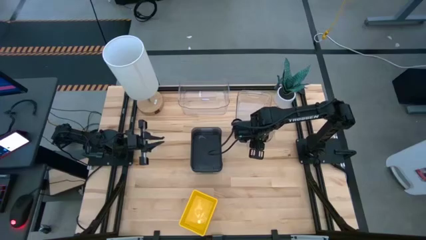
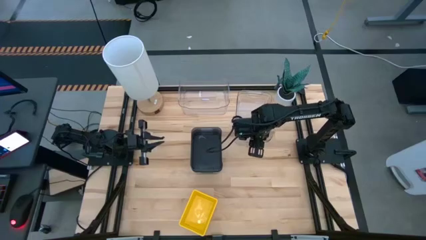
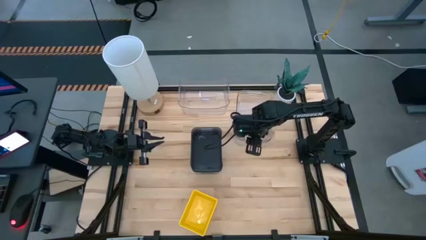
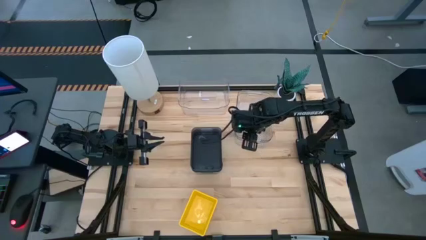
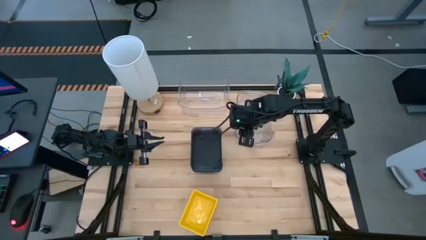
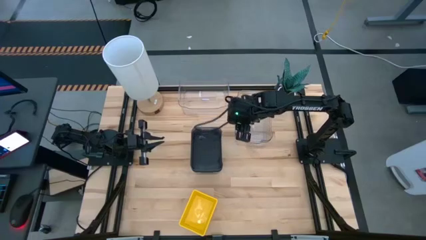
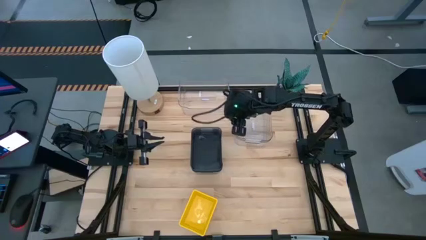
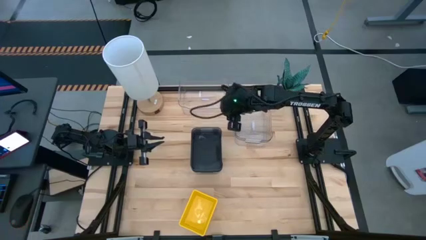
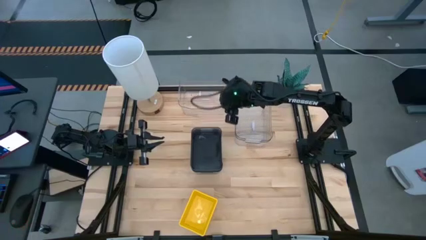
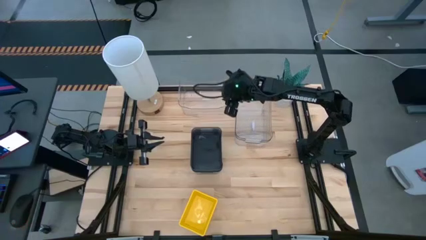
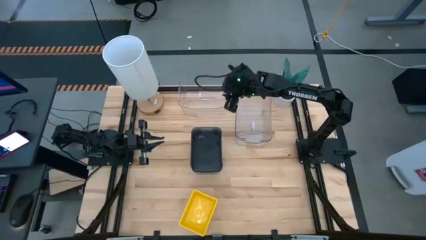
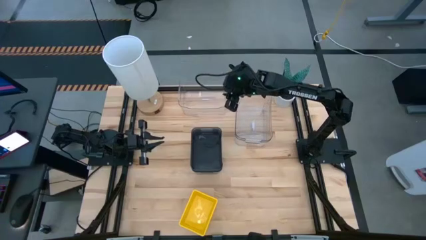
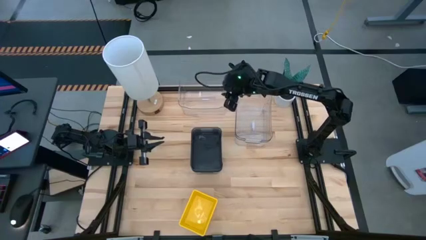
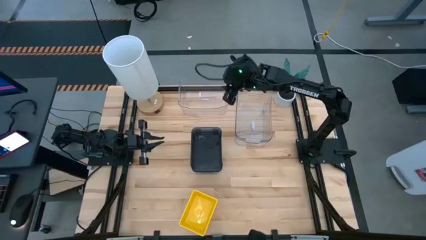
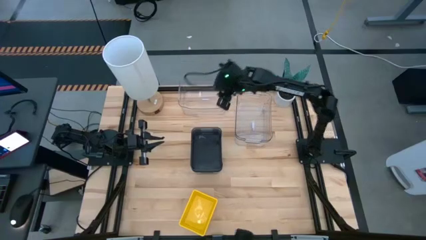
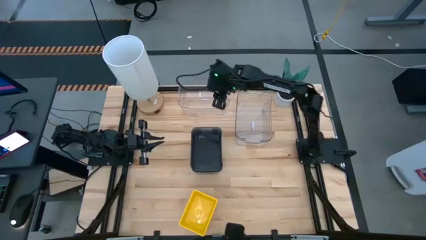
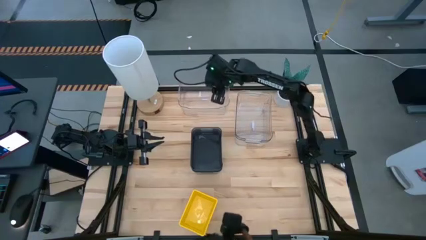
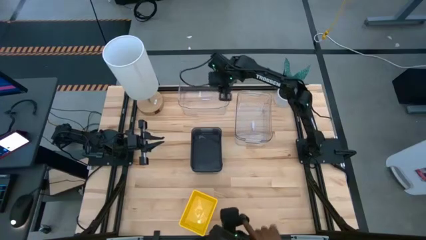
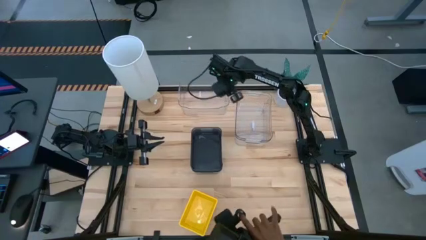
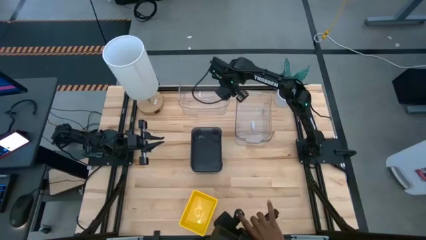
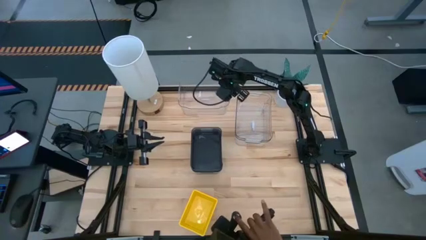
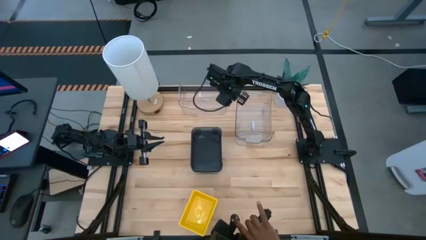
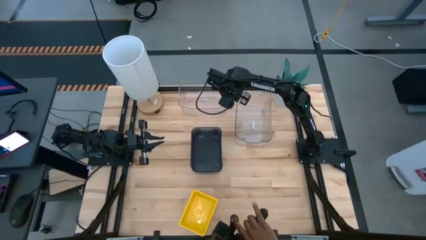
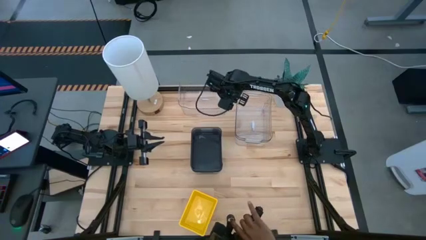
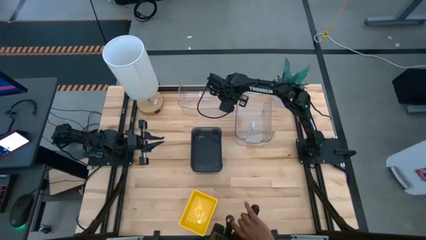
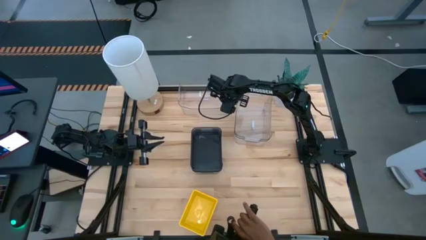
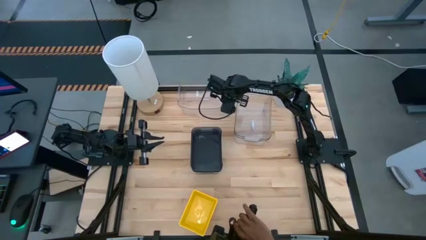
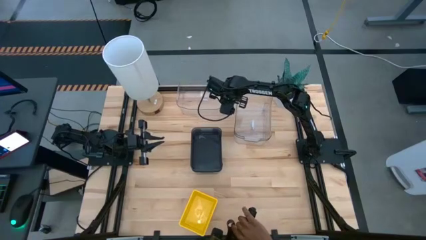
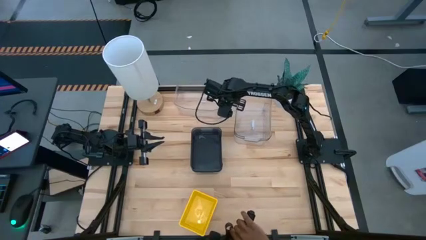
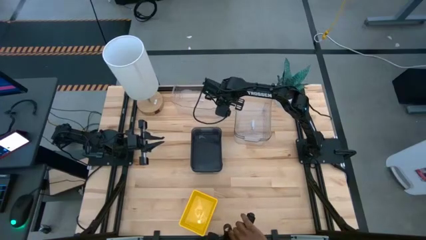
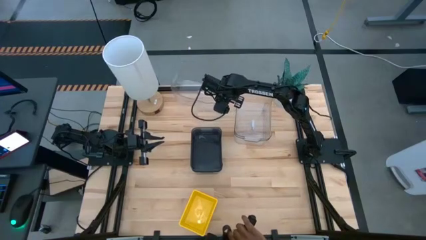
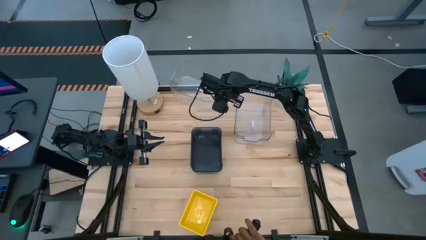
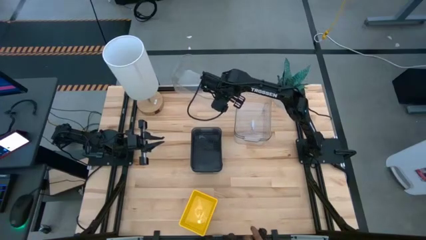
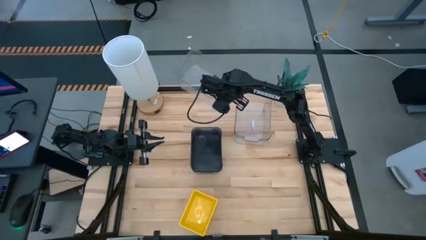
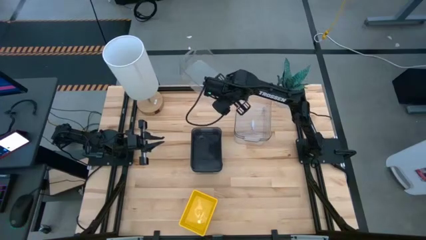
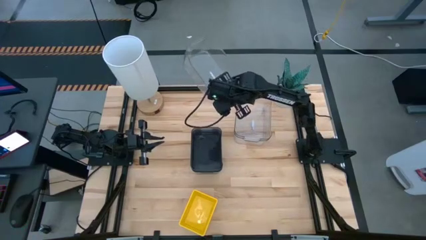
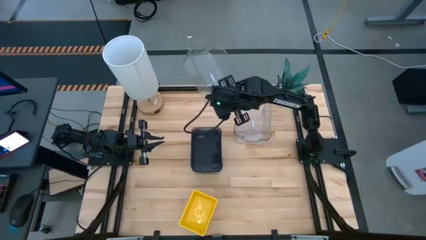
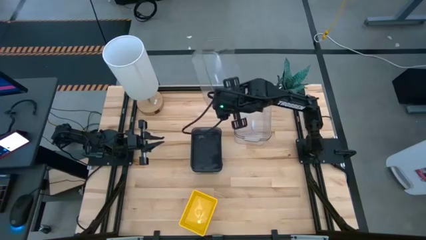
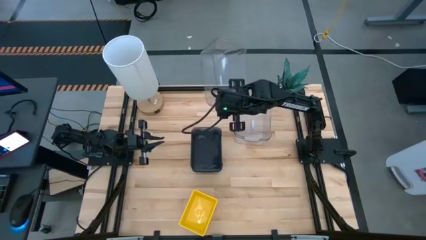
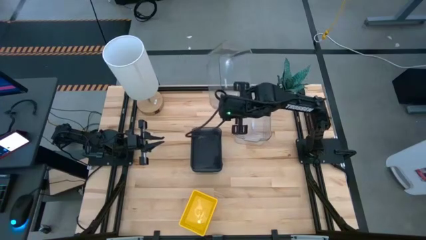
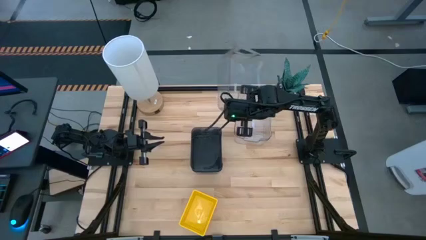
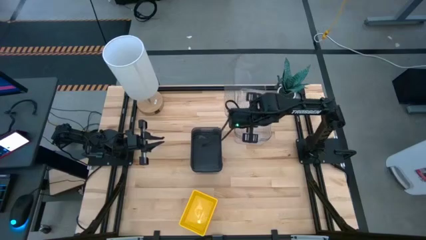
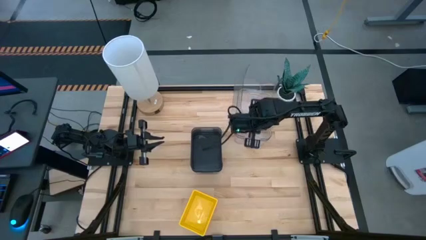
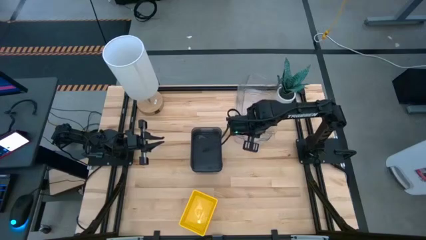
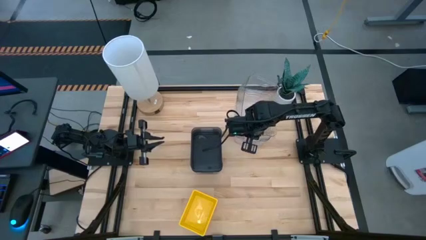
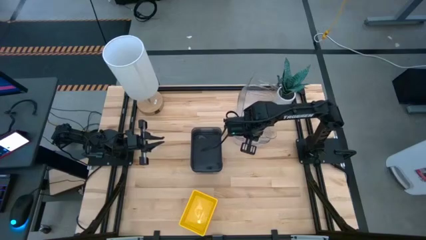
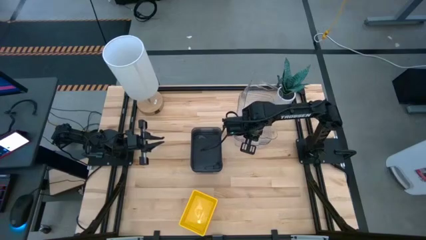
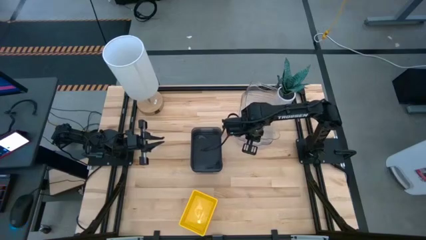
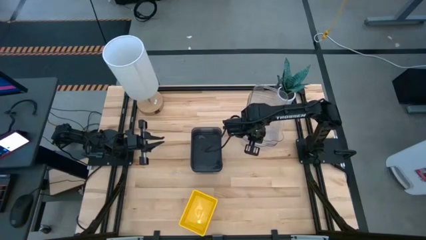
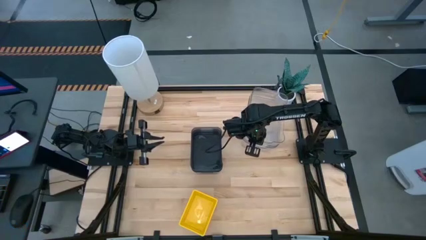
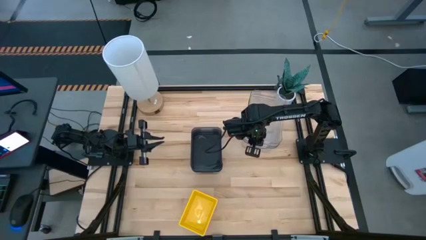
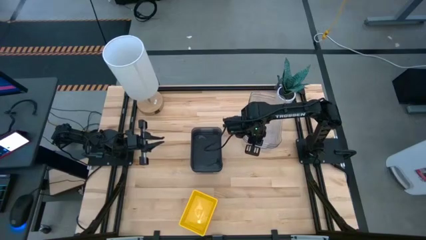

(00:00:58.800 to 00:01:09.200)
Stack the left transparent bin on top of the transparent bin

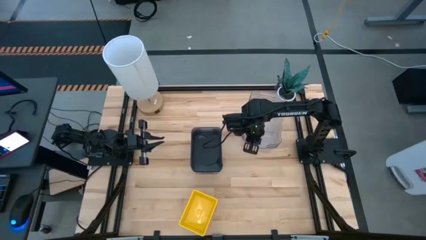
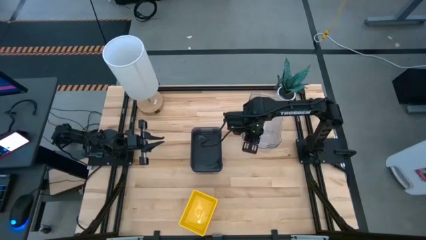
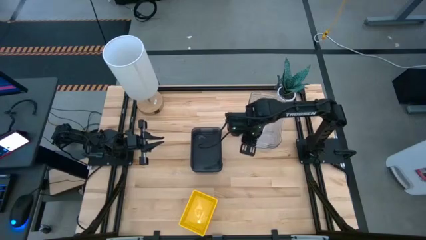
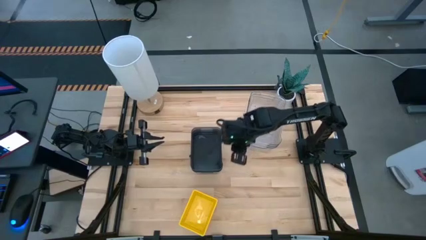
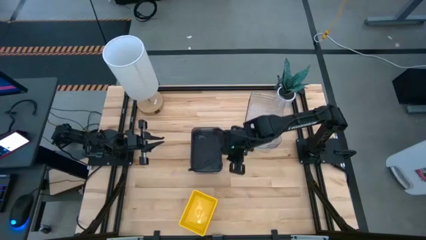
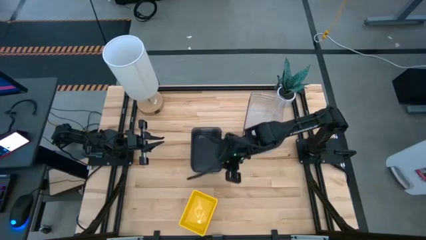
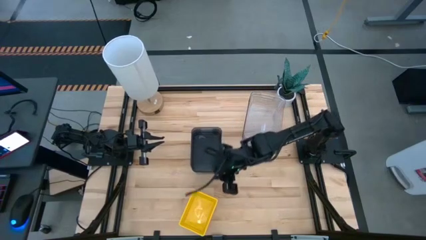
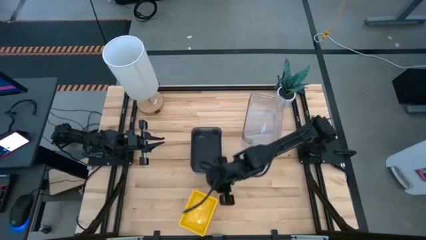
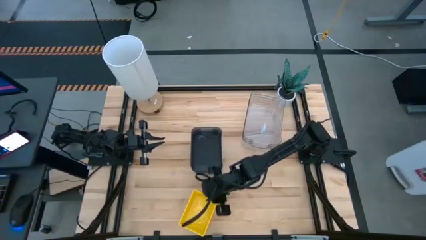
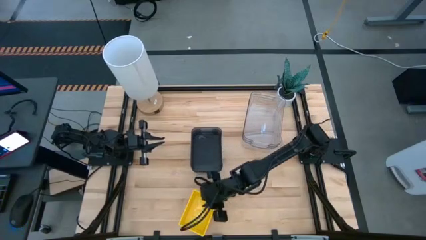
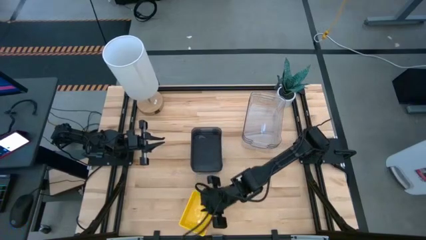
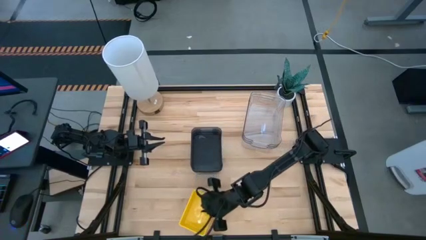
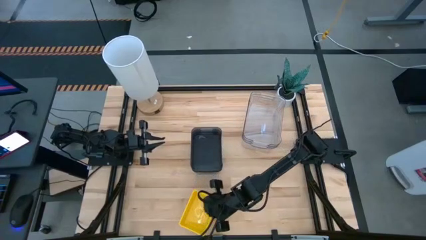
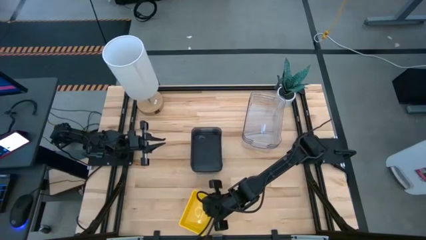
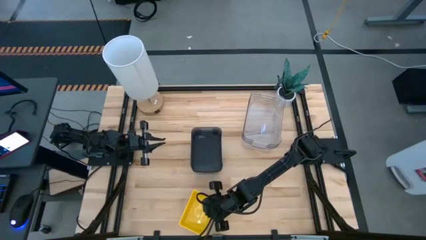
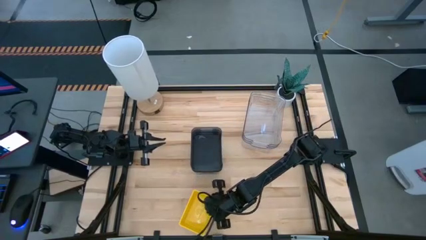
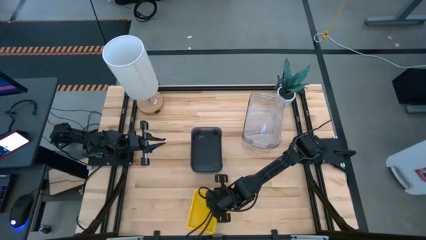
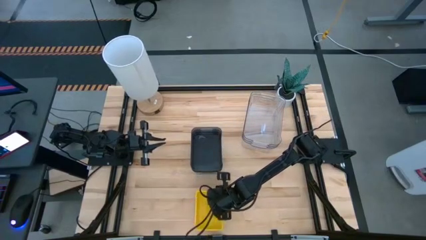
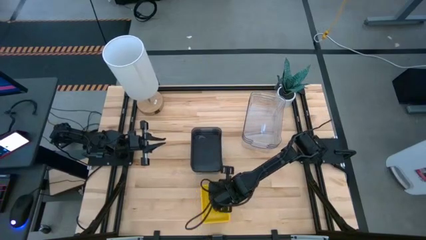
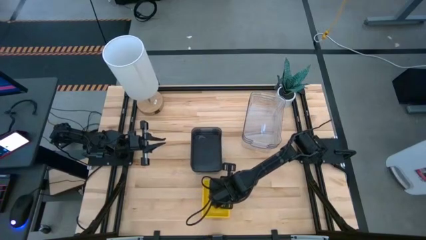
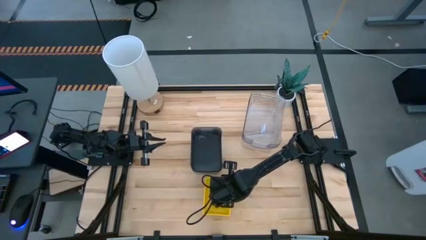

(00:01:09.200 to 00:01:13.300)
Move the yellow bins to the tottom center of the table
